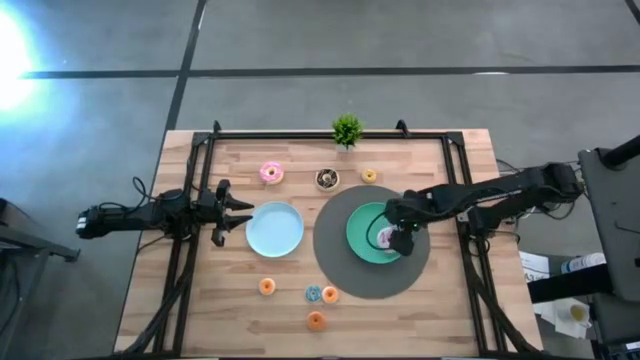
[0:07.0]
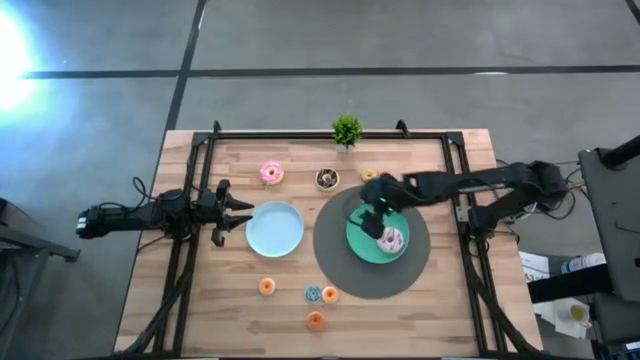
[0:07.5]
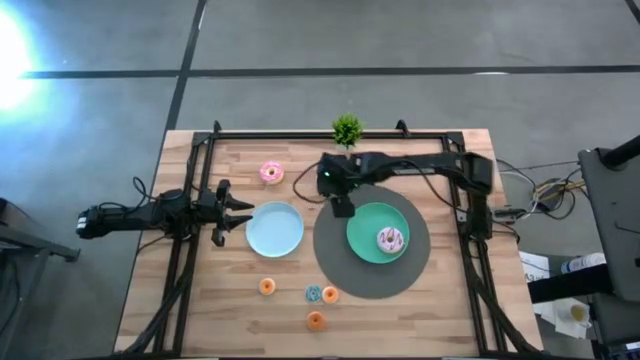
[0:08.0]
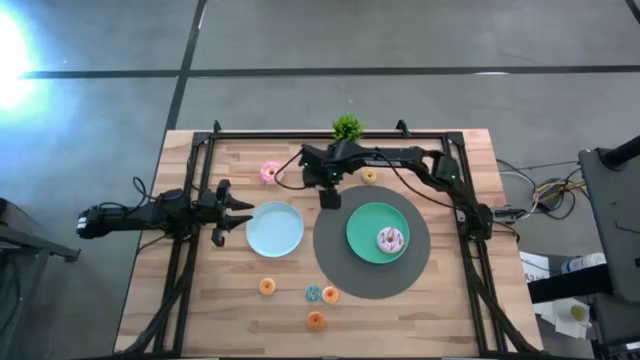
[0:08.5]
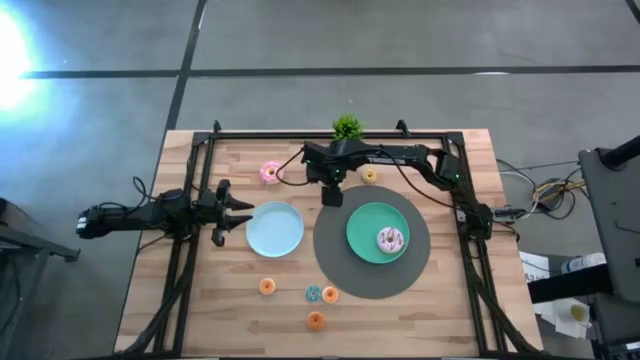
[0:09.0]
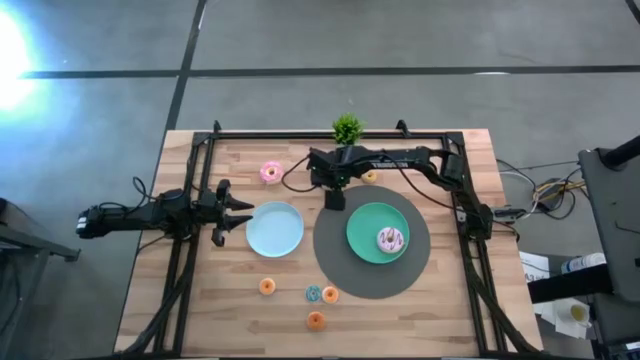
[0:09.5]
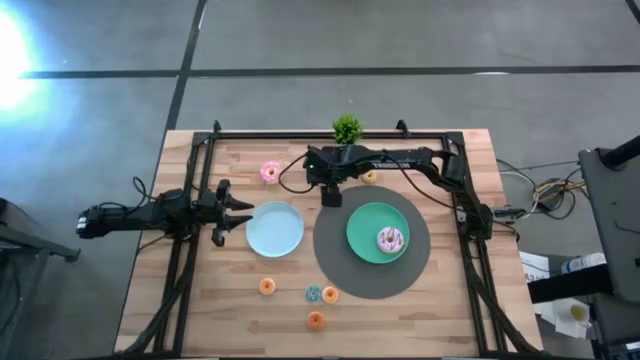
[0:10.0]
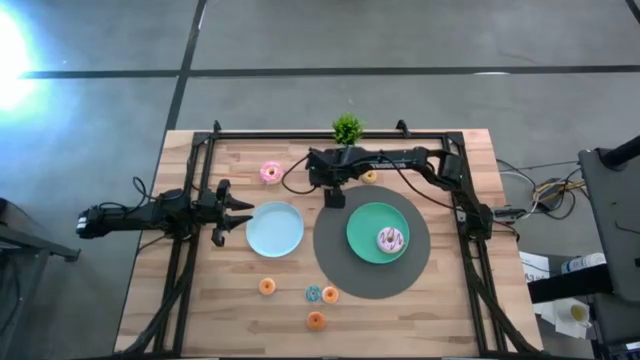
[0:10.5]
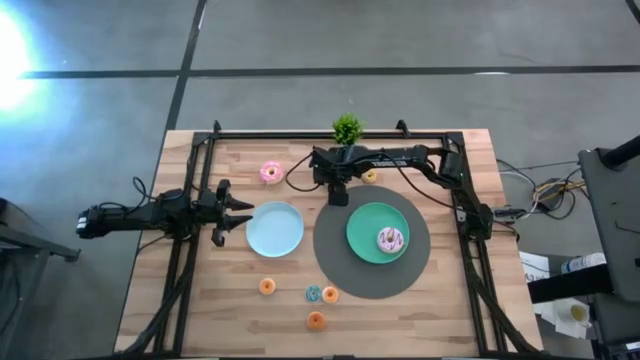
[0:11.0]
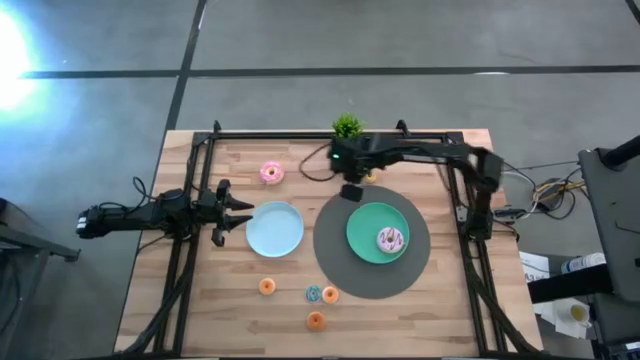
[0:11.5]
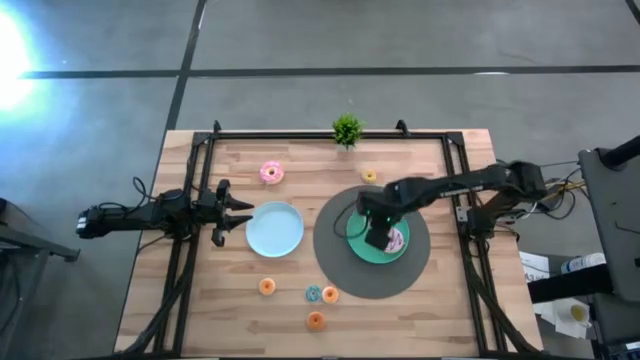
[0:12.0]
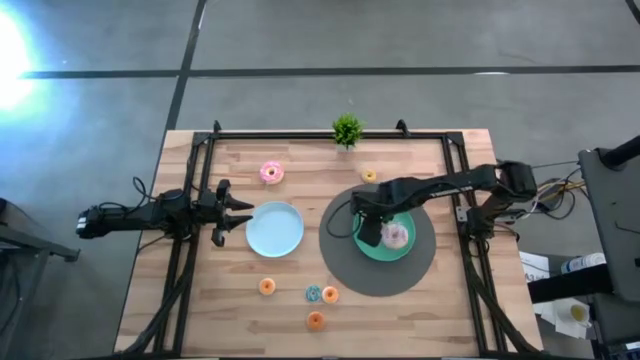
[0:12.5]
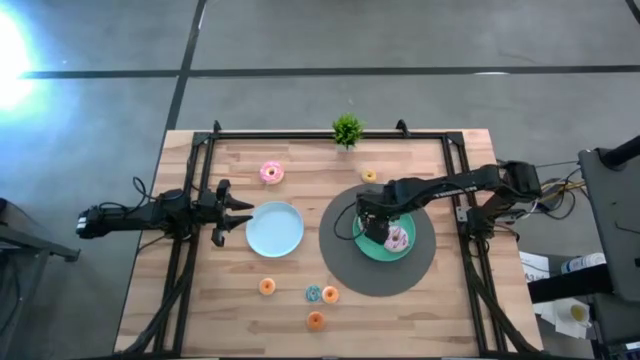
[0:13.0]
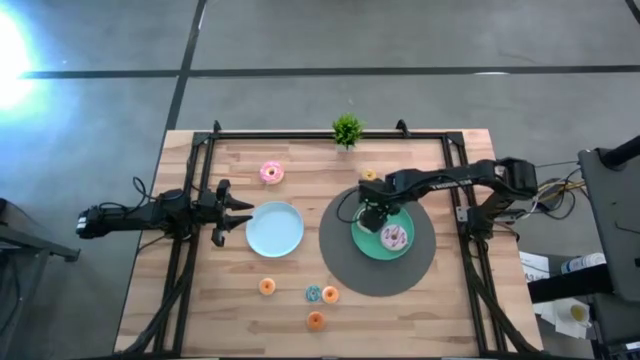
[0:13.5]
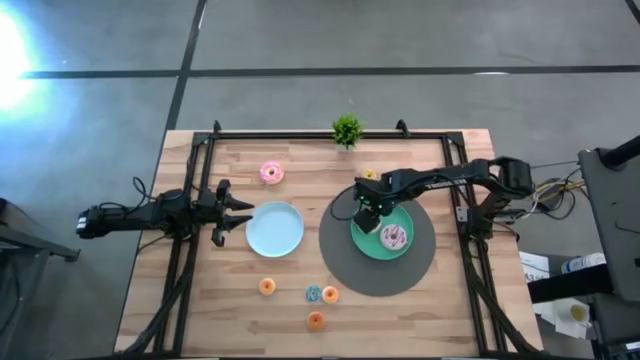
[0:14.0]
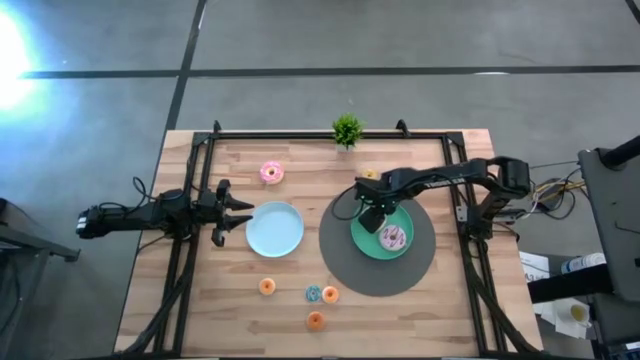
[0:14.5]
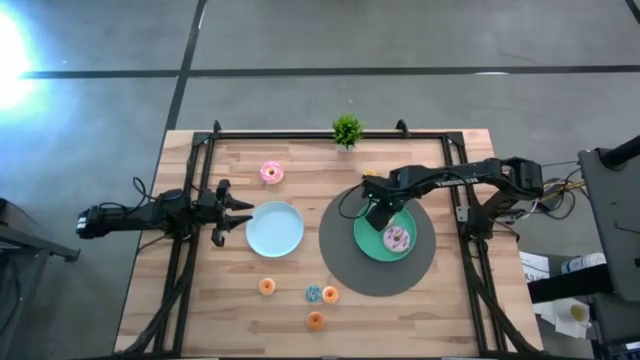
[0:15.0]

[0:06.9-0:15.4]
Task: Pick & Place donuts
Put the large black donut on the green plate

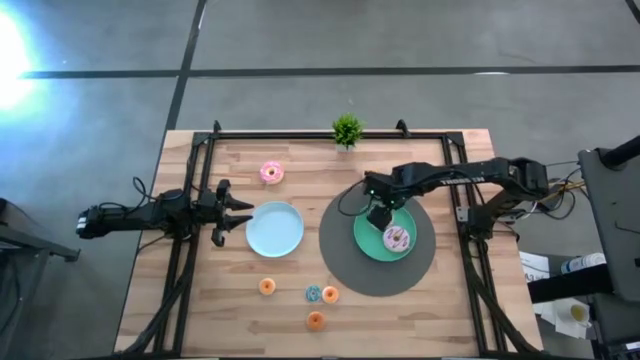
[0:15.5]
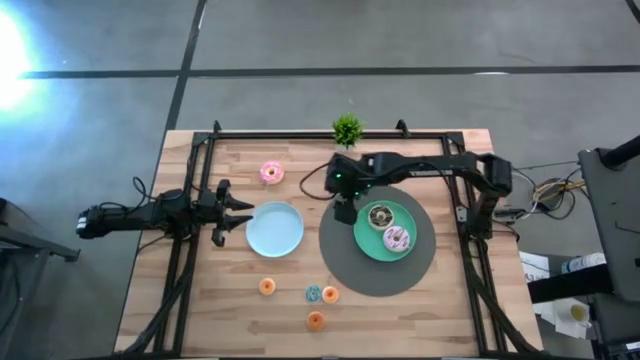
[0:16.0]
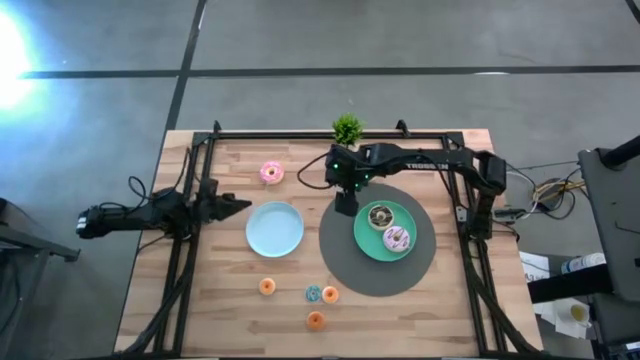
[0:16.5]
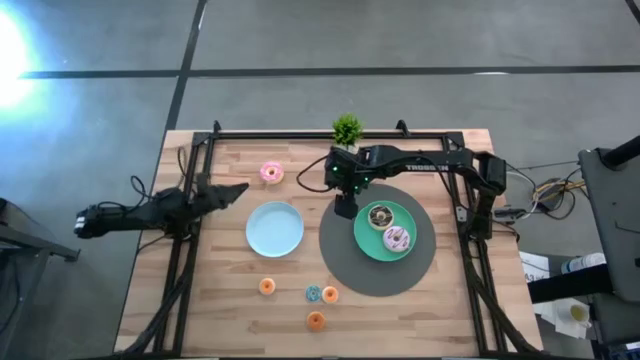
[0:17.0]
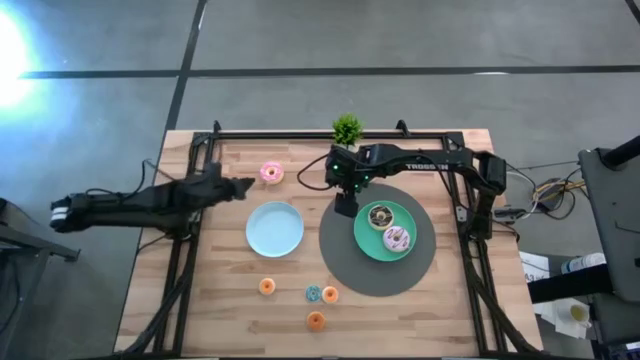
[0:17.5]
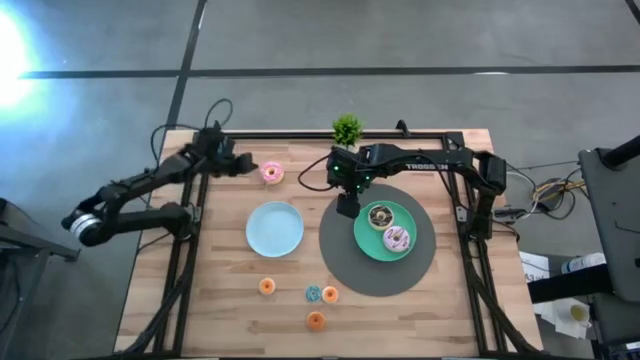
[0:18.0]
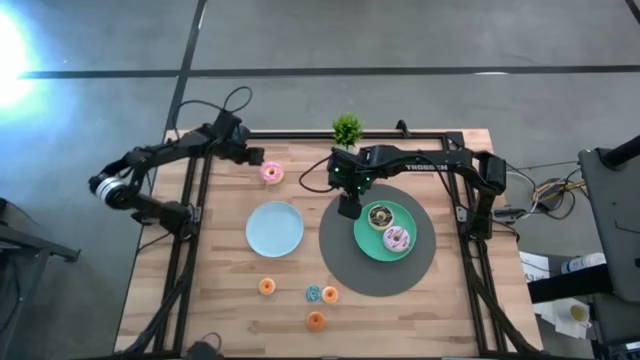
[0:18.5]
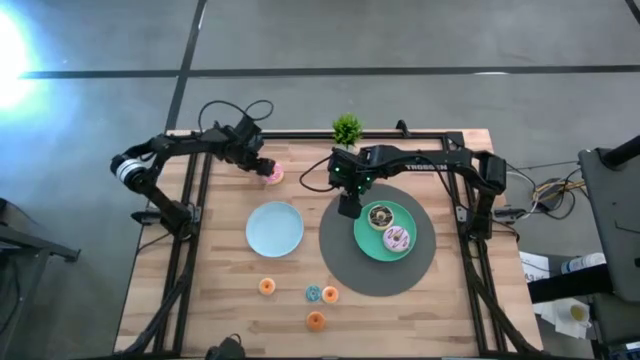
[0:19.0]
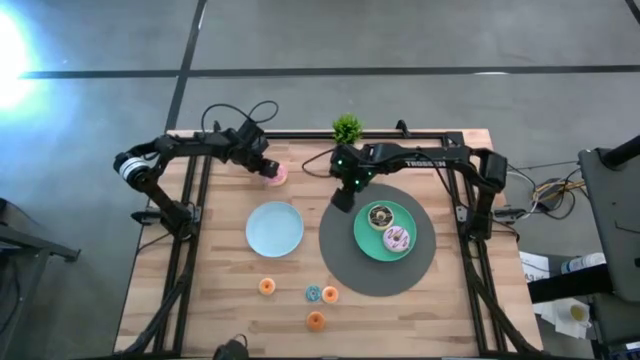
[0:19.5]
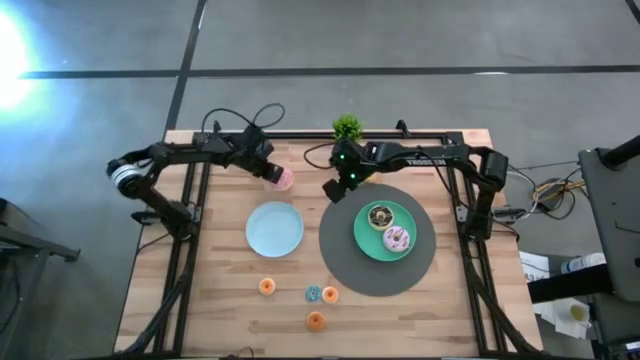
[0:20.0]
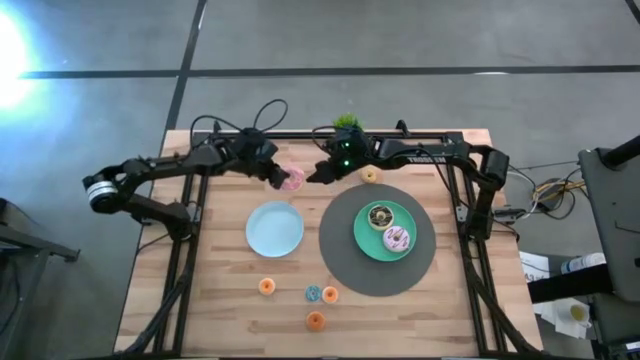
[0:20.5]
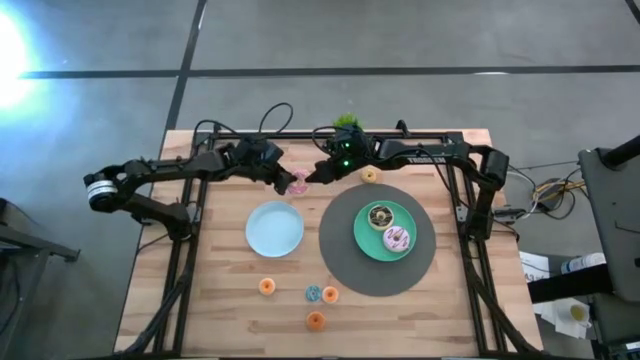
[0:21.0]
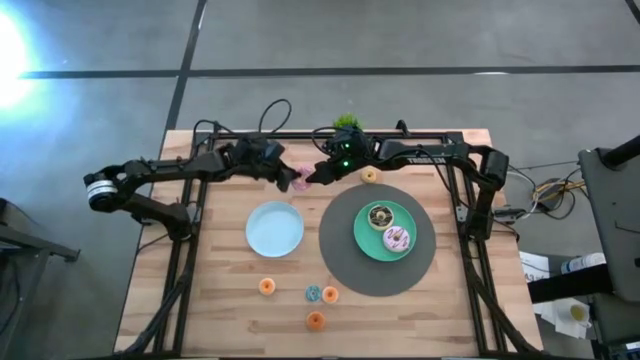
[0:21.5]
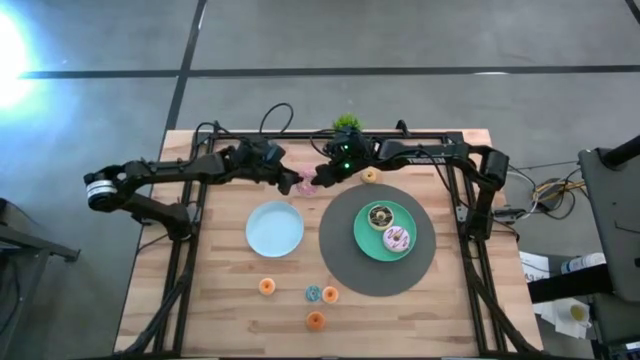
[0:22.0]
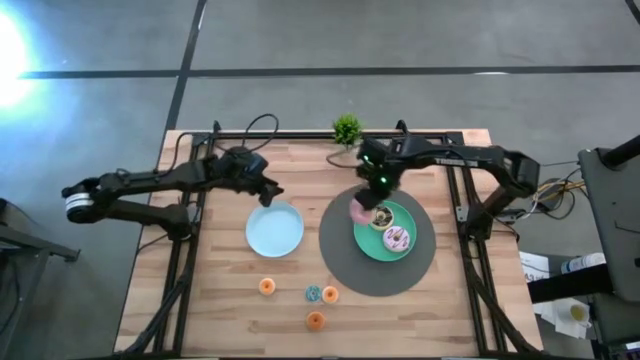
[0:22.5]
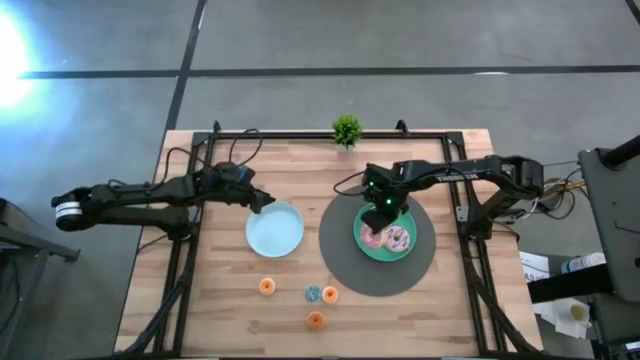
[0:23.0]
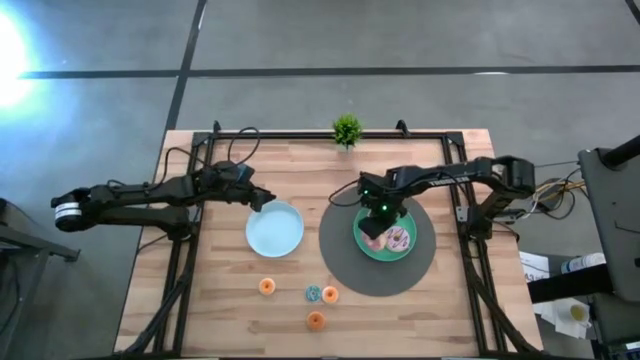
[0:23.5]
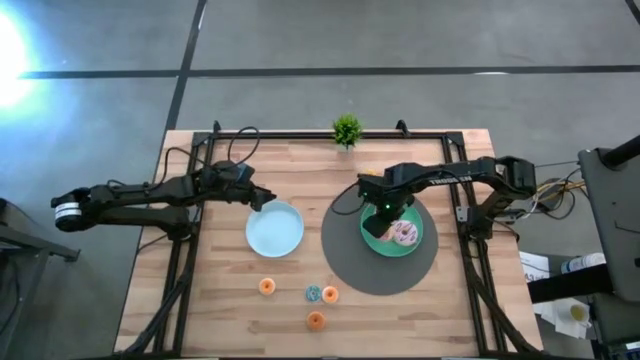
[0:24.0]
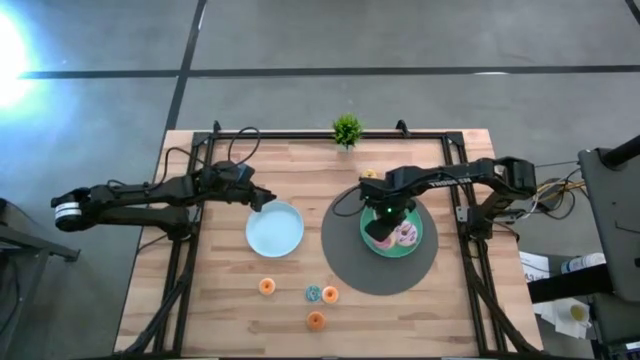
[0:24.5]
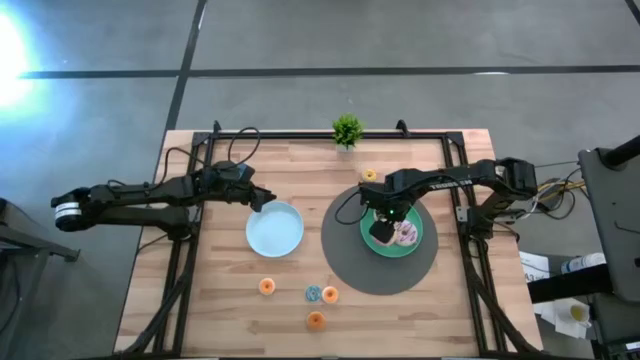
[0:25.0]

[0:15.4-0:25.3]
Put the large pink donut on the green plate

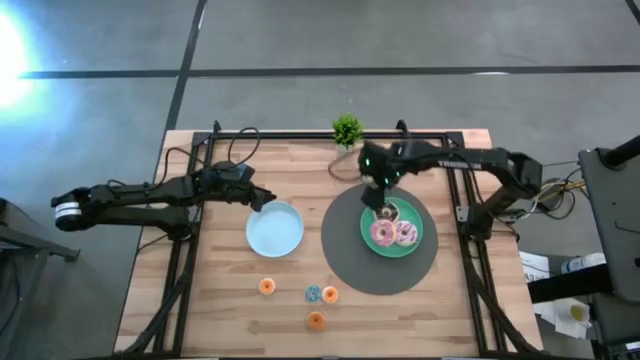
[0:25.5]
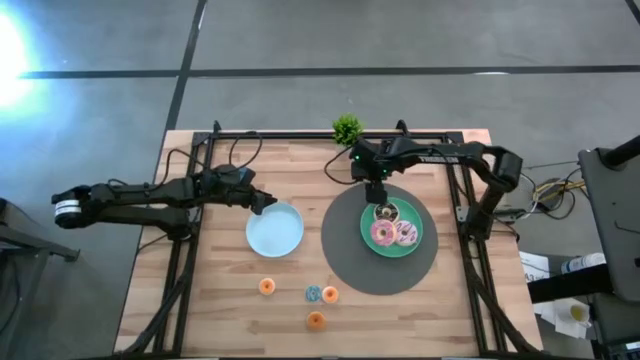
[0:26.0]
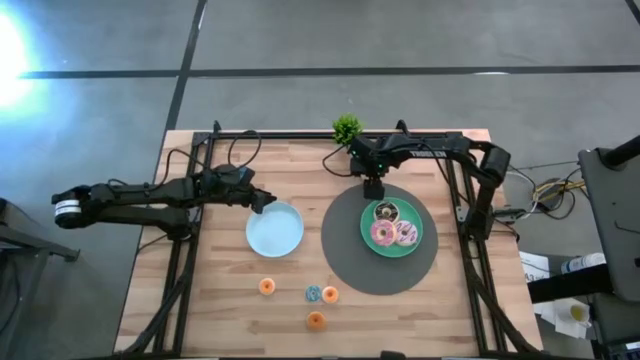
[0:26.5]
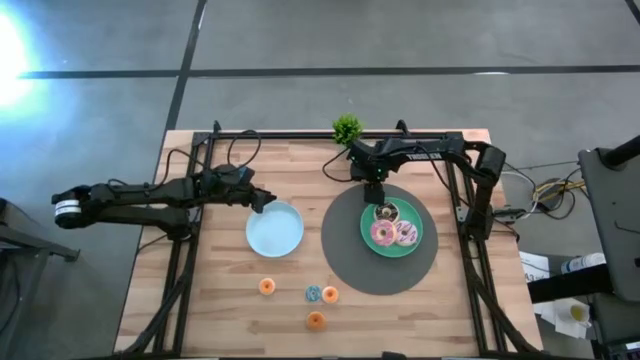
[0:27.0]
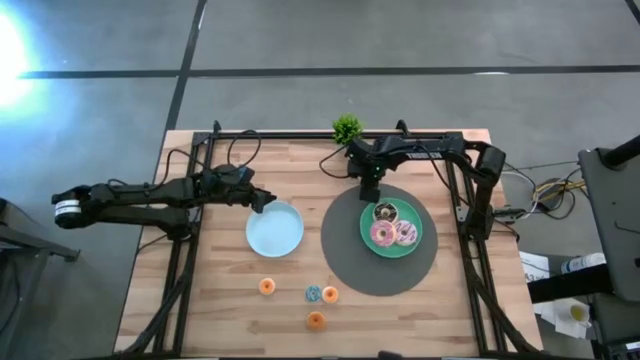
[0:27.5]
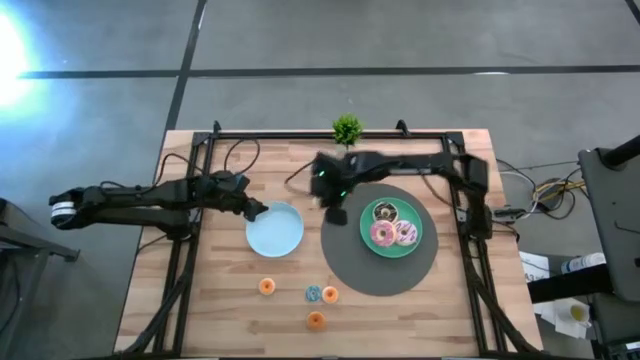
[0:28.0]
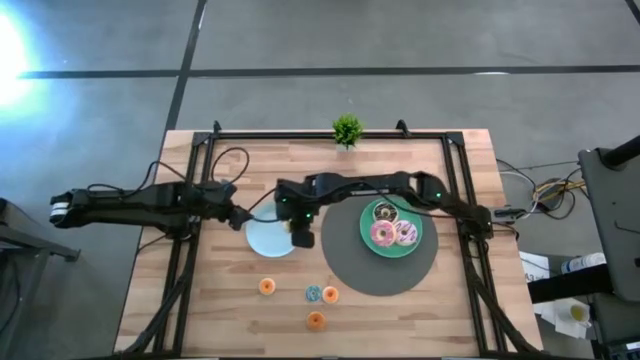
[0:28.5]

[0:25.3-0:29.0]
Put the small yellow donut on the blue plate

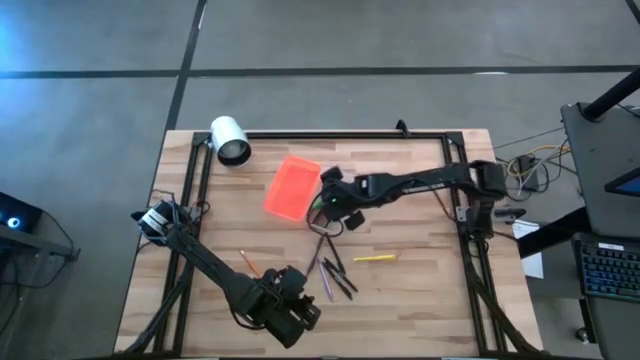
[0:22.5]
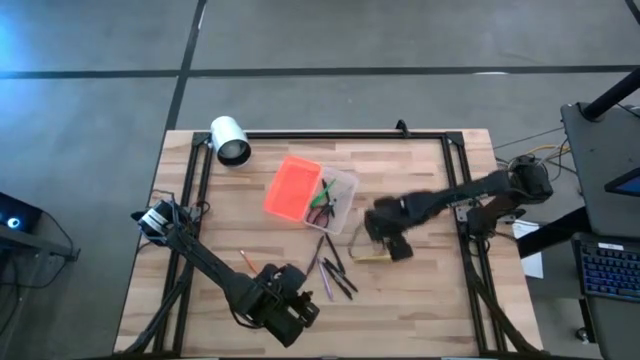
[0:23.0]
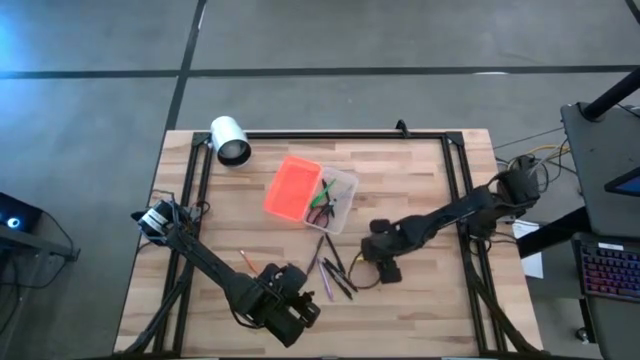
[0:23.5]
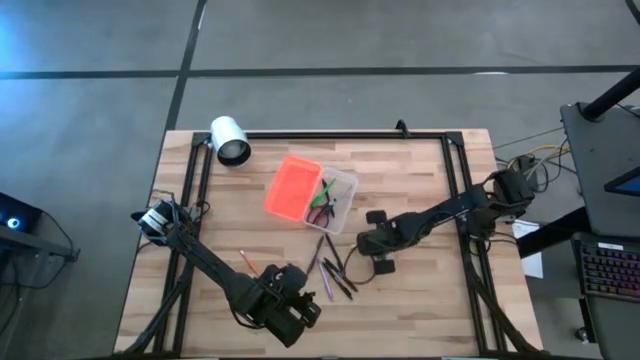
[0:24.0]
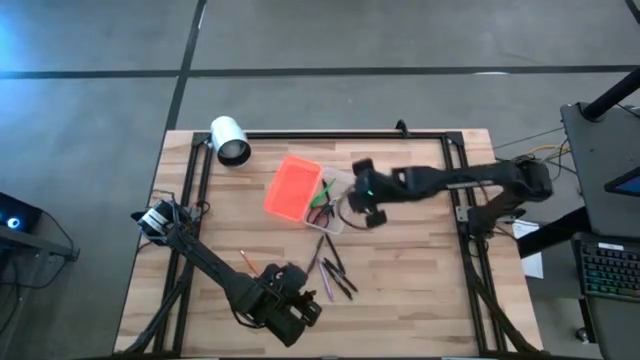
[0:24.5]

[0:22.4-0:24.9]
Task: Pick & place school supplies into a supply box
Put the yellow pen into the orange supply box
